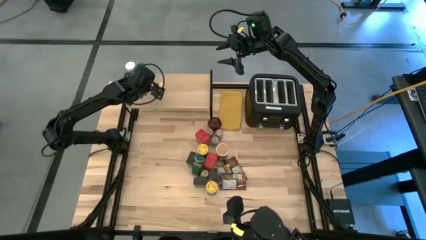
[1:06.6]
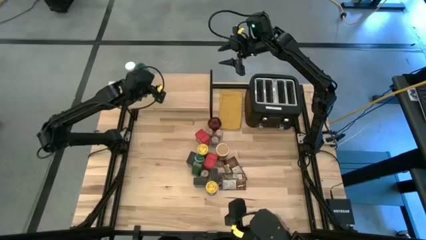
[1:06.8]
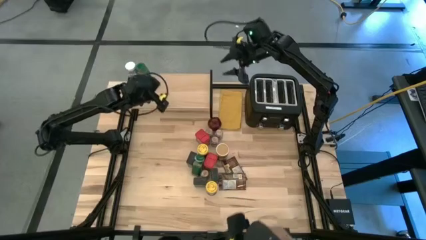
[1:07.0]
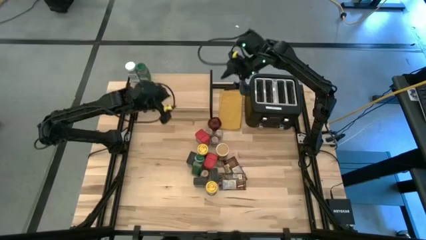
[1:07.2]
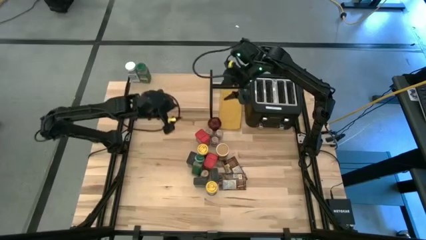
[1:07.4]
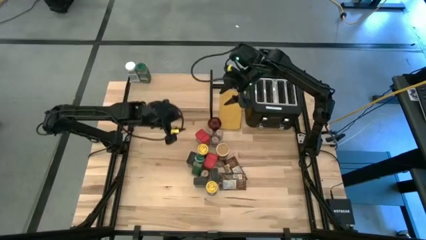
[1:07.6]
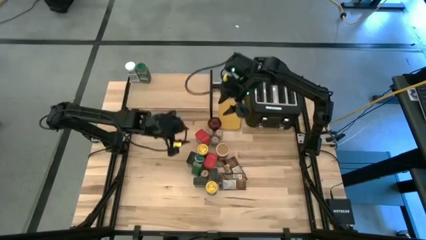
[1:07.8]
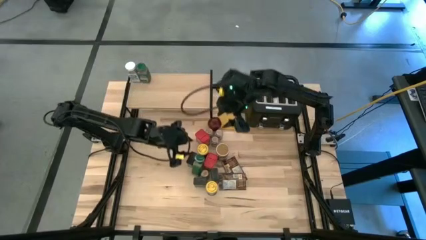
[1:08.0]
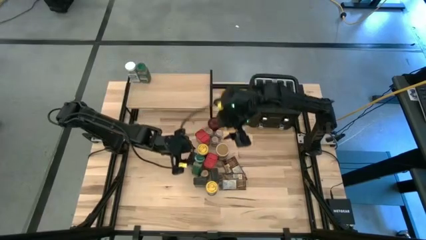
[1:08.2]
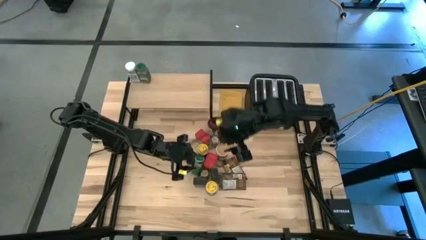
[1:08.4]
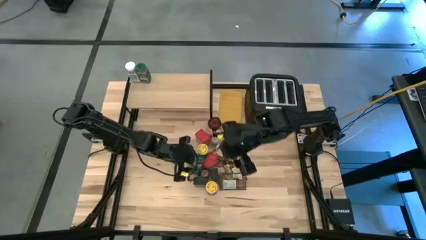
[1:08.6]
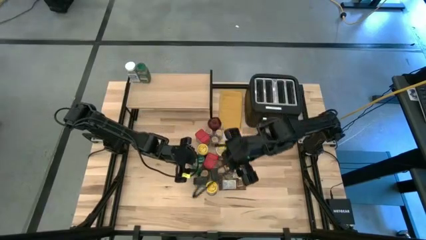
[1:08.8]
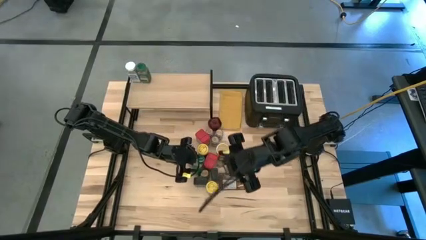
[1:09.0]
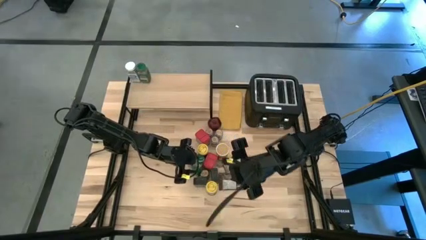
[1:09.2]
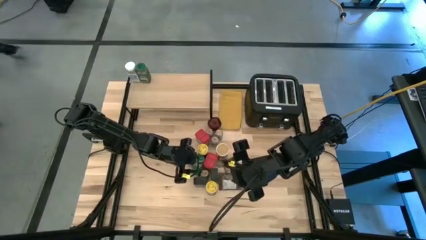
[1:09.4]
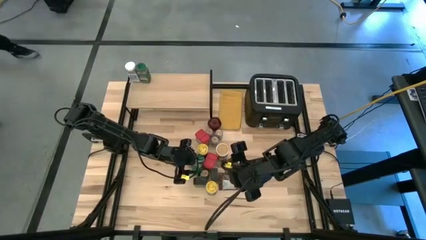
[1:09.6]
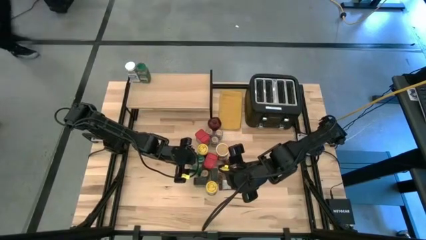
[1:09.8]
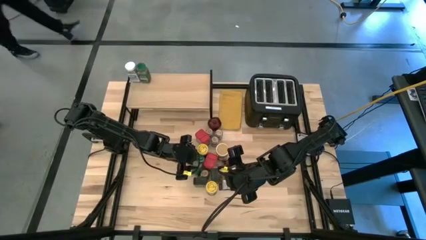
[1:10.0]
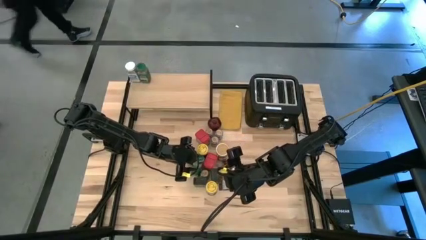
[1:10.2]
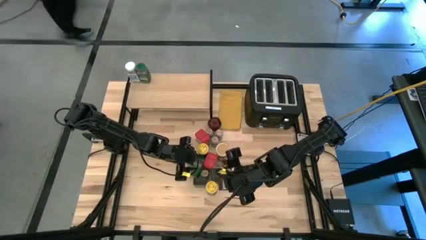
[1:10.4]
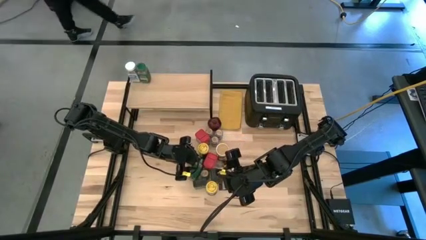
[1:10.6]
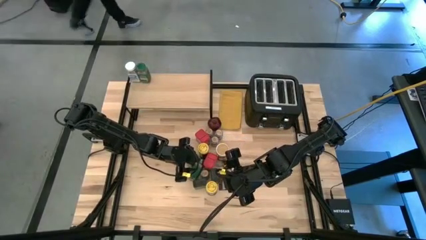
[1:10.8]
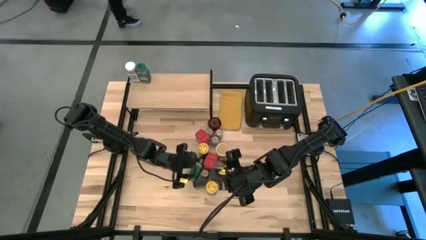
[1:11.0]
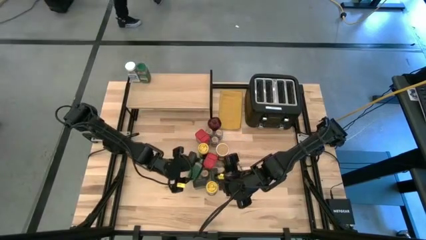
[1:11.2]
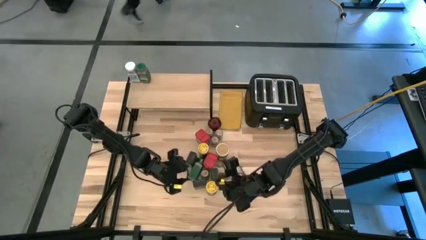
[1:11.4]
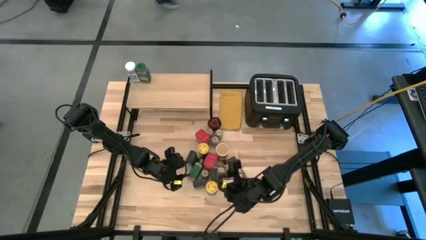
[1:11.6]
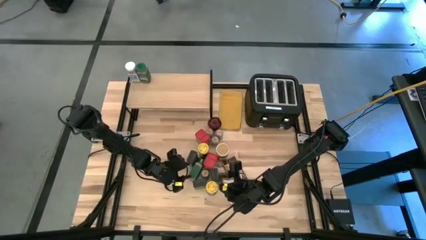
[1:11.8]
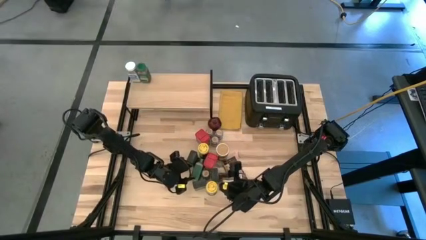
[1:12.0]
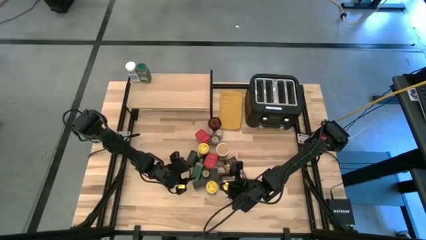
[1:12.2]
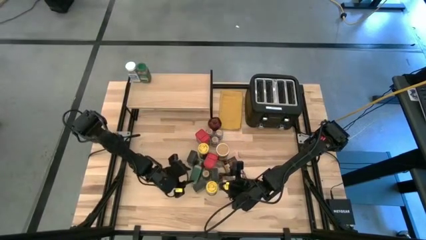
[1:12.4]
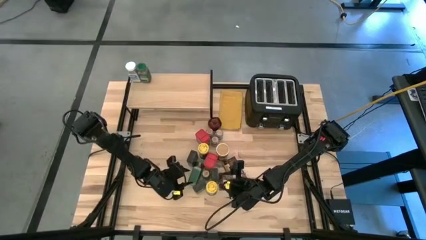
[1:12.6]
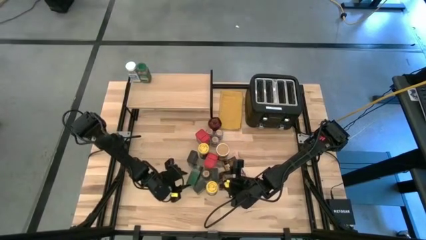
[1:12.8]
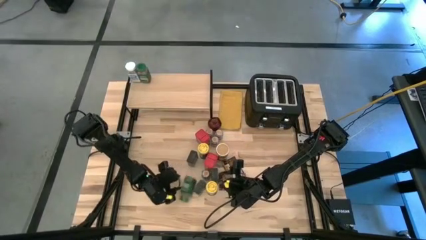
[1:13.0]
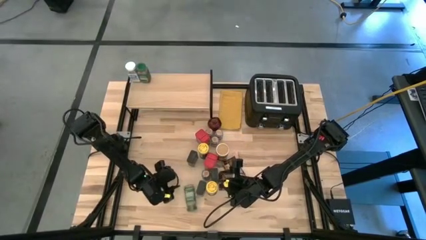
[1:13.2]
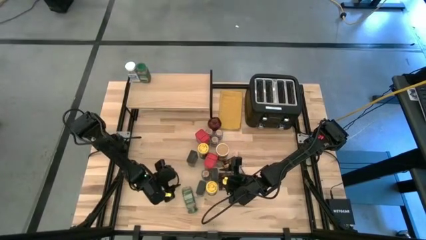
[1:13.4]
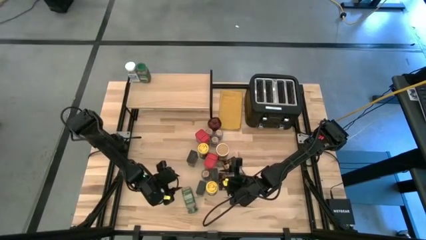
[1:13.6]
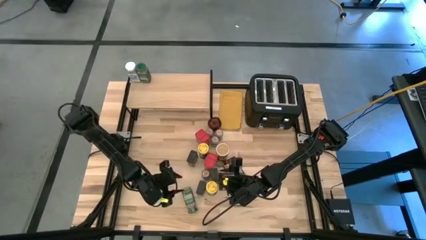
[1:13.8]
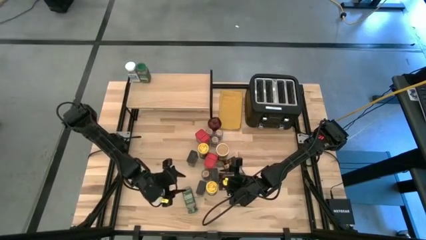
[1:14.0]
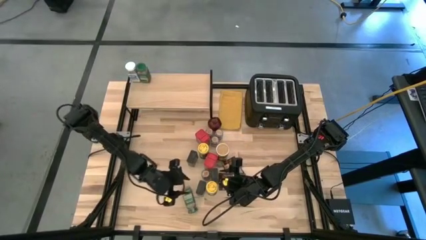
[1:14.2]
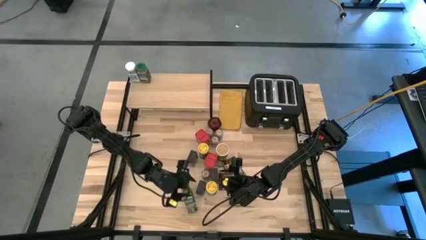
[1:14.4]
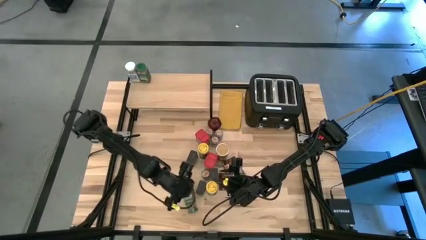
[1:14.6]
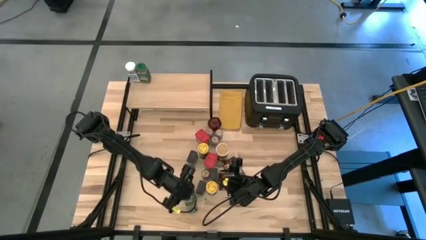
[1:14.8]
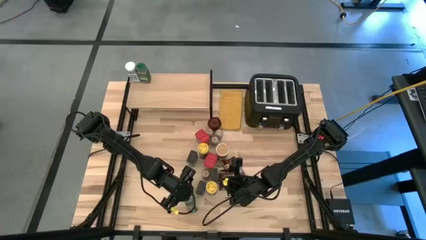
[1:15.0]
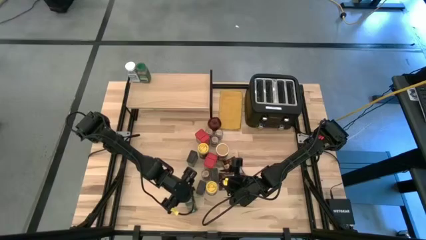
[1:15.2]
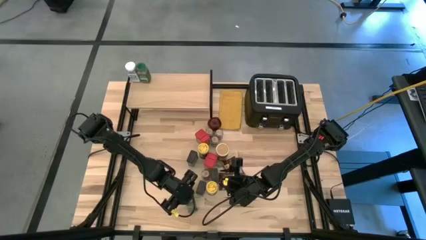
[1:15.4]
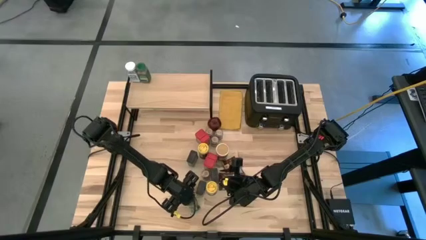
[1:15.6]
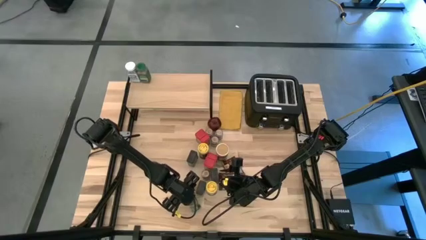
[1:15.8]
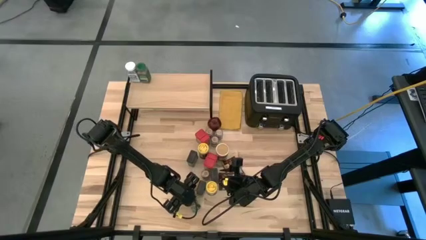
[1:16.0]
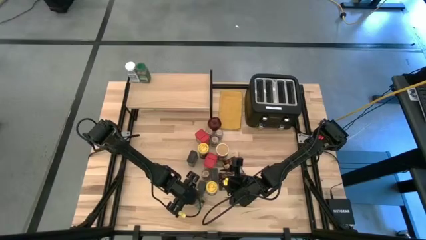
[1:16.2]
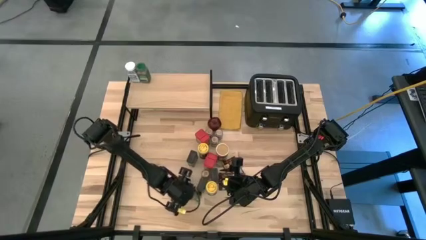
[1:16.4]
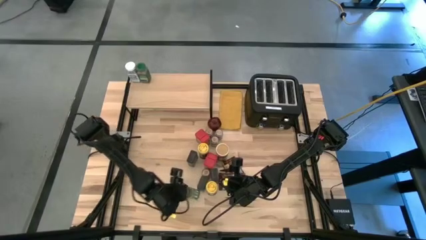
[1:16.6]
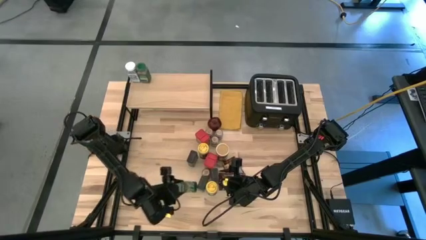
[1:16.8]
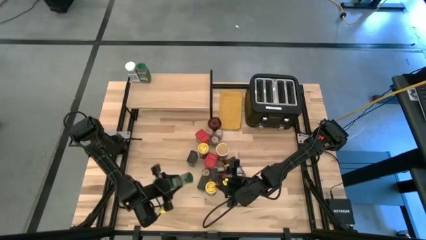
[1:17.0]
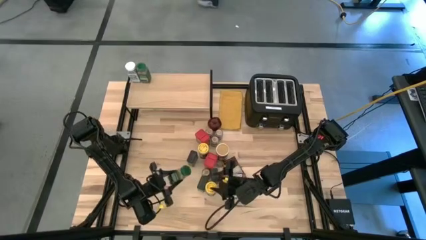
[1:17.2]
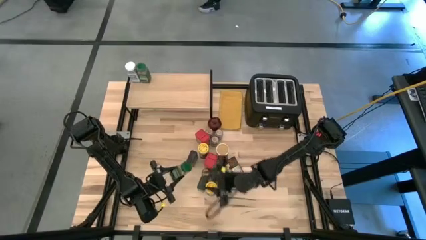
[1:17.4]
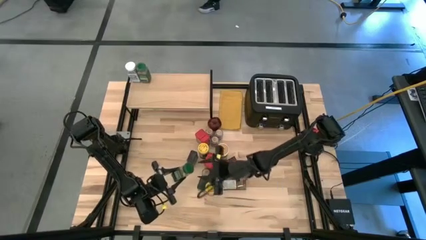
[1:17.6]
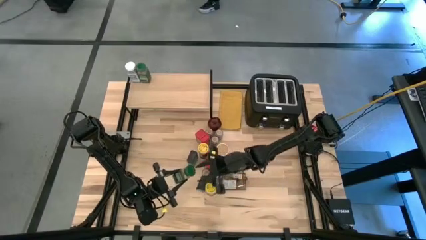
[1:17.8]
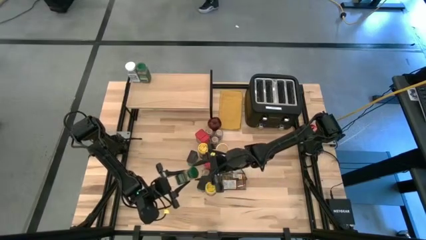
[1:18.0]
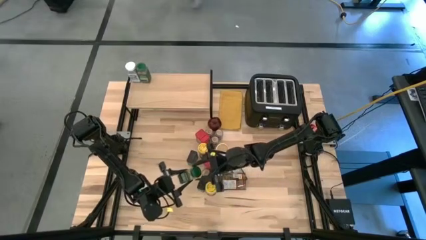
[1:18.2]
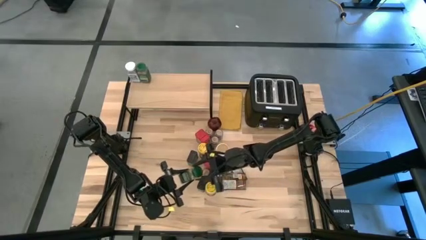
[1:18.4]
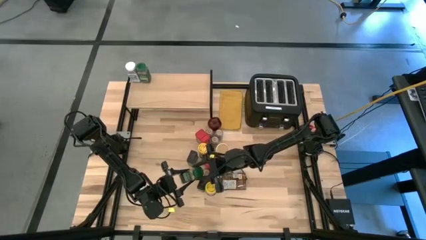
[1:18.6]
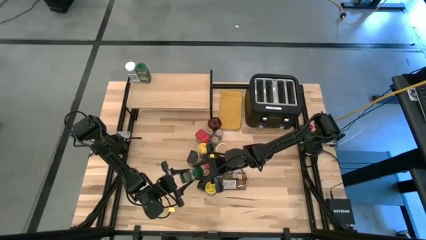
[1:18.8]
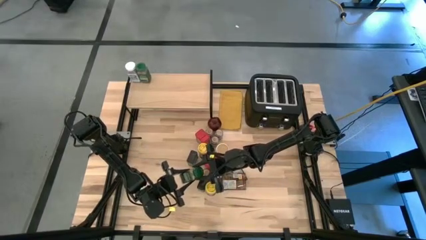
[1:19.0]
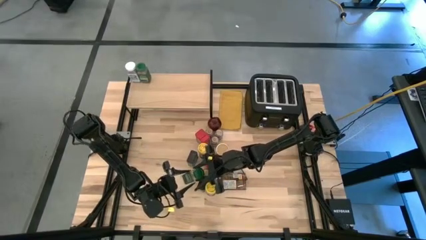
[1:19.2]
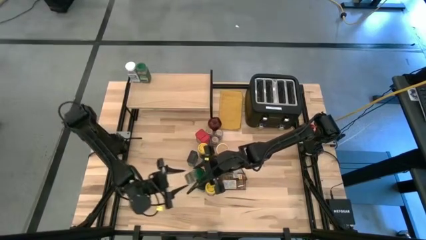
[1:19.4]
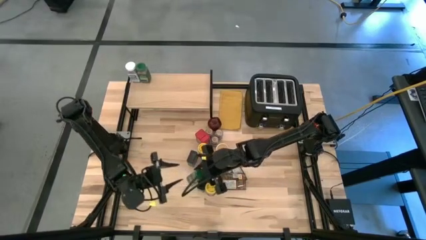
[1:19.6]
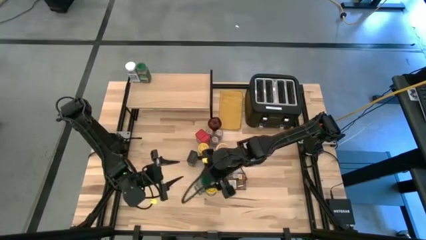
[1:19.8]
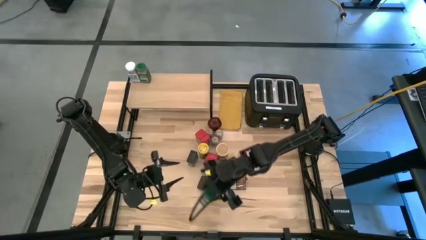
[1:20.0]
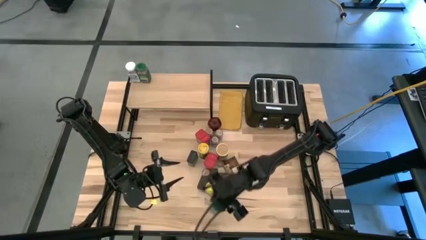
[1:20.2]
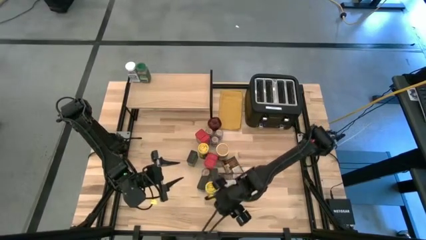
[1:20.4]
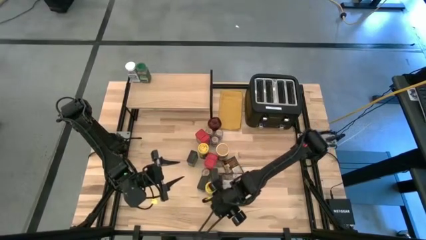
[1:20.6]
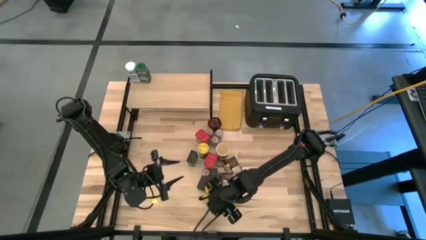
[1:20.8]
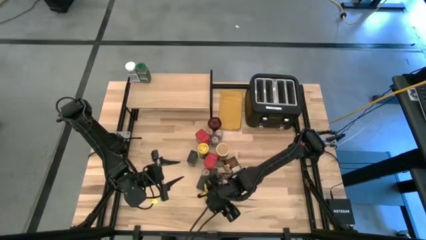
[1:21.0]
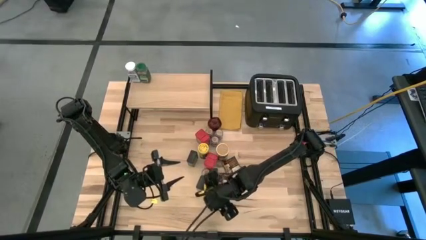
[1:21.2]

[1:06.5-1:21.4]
Task: Shelf spices
Put the green seasoning bottle aligned with the other green seasoning can on the shelf

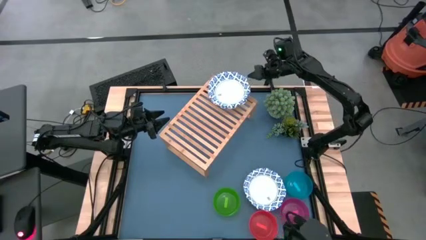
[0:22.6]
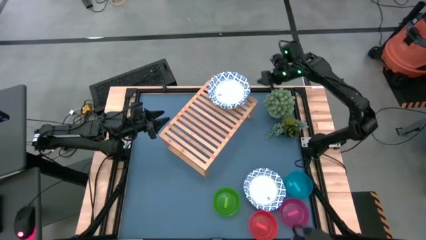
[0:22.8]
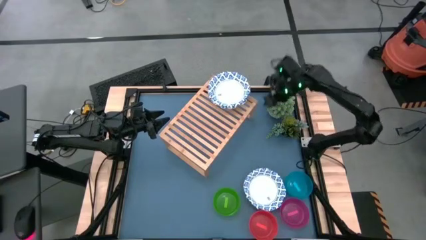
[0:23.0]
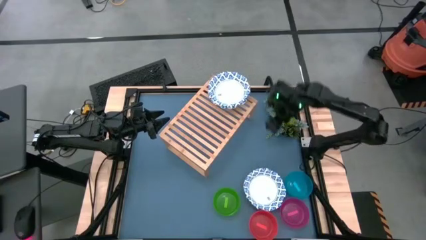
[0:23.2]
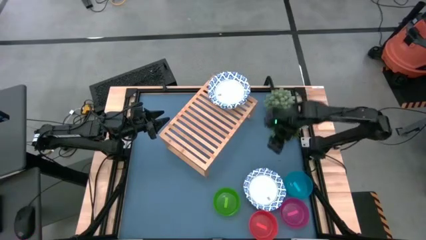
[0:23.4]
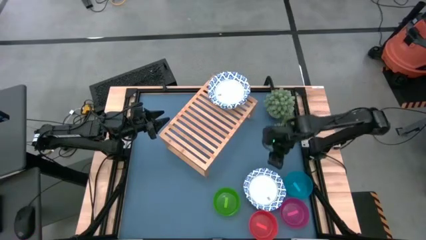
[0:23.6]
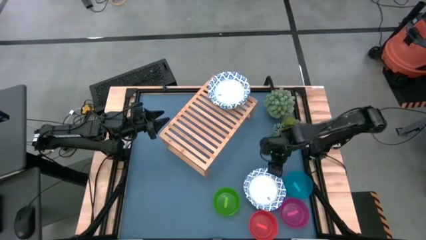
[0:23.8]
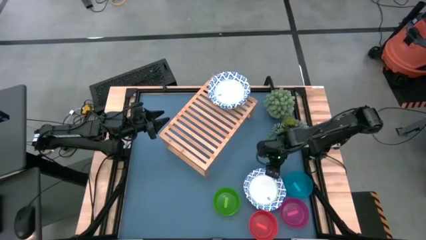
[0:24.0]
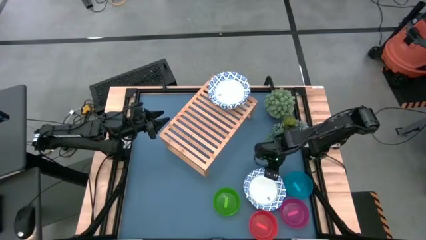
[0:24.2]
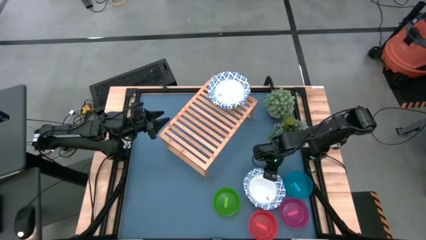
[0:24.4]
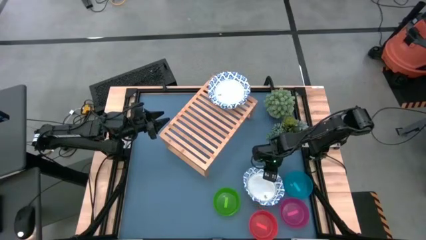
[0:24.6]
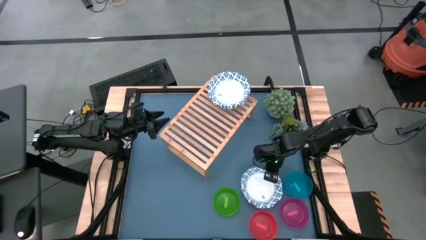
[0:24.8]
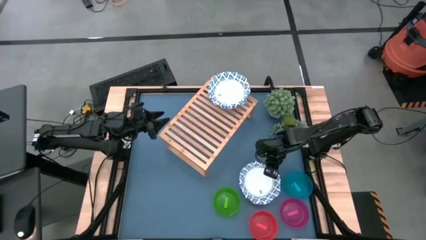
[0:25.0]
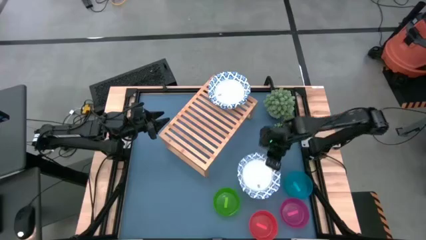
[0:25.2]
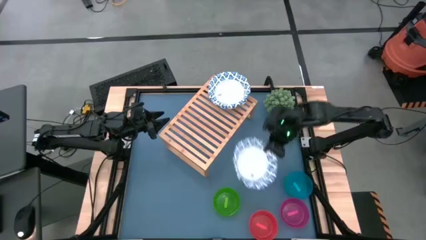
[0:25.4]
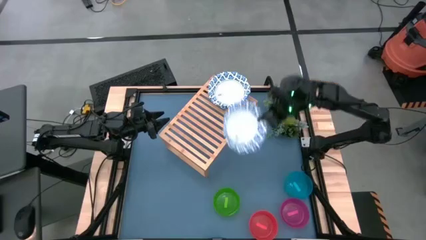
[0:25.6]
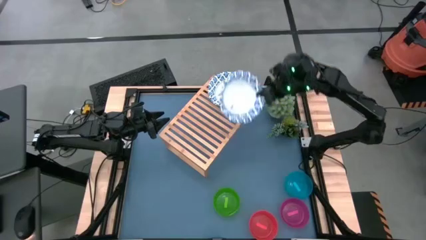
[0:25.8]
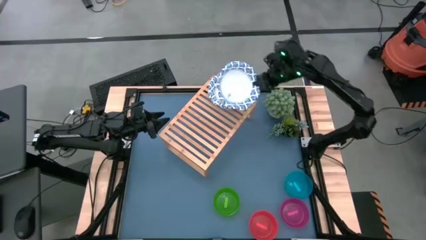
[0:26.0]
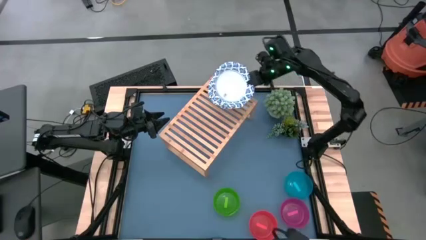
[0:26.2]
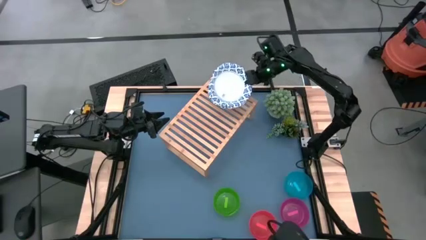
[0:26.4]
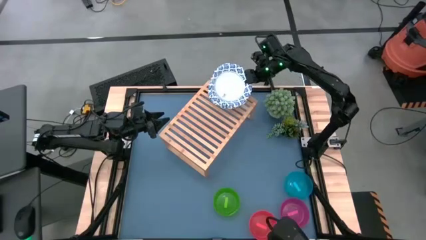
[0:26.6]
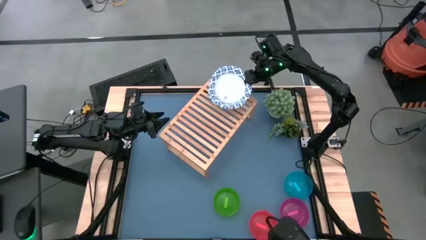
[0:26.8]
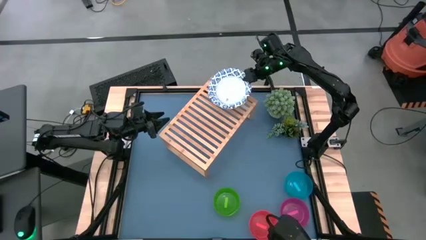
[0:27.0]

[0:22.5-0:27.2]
Task: Place and stack bowls onto a shelf
Stack the white patterned bowl on top of the white patterned bowls on the shelf
